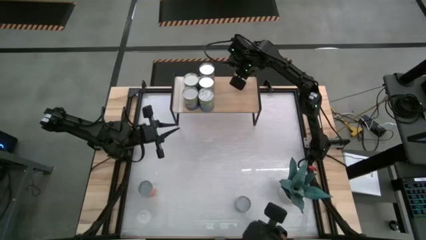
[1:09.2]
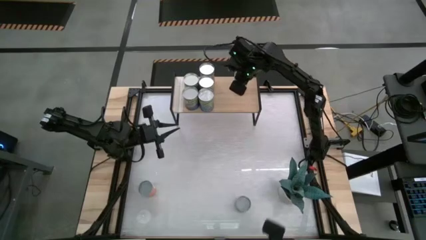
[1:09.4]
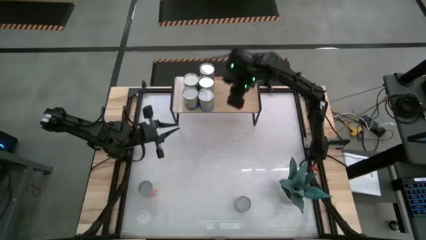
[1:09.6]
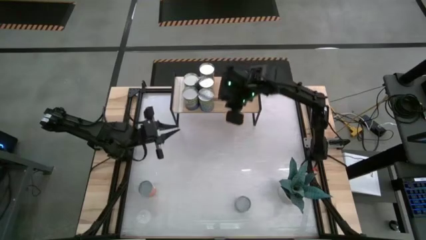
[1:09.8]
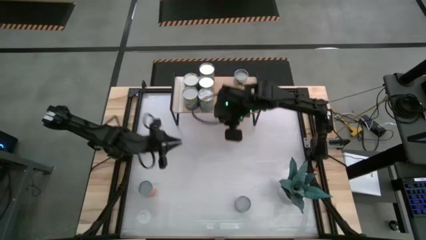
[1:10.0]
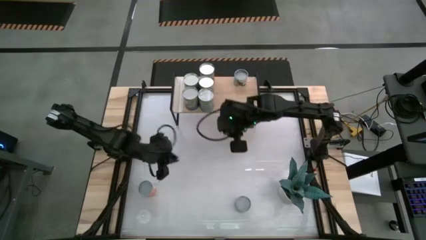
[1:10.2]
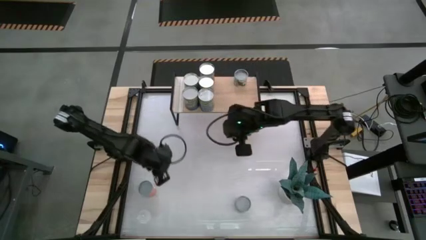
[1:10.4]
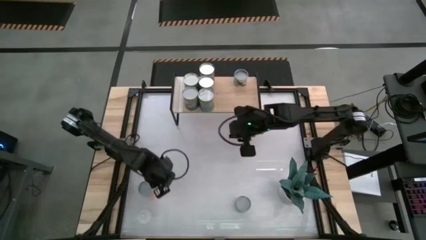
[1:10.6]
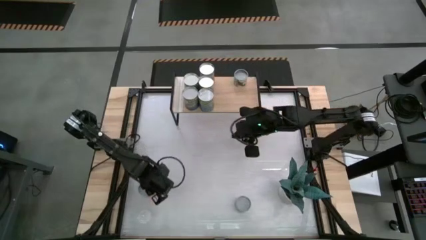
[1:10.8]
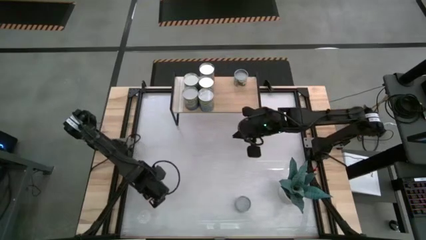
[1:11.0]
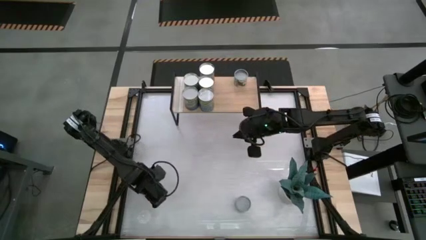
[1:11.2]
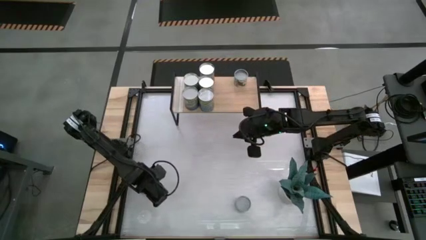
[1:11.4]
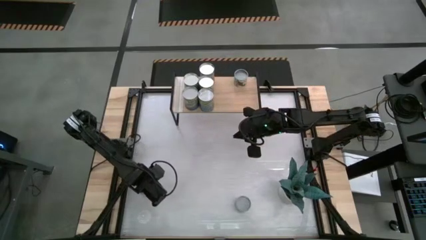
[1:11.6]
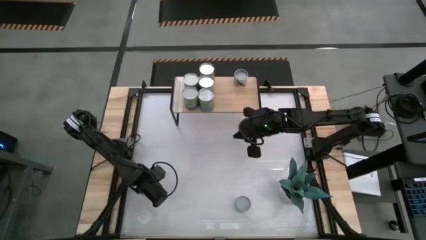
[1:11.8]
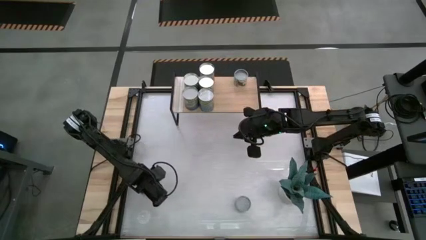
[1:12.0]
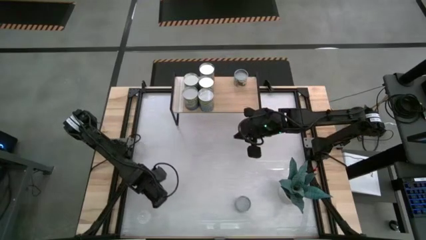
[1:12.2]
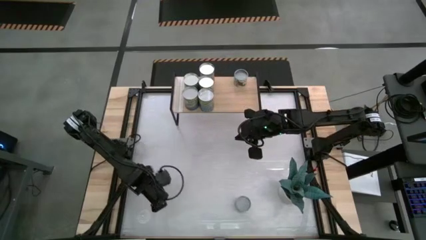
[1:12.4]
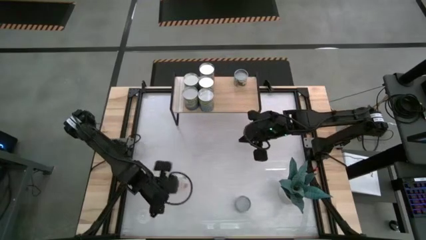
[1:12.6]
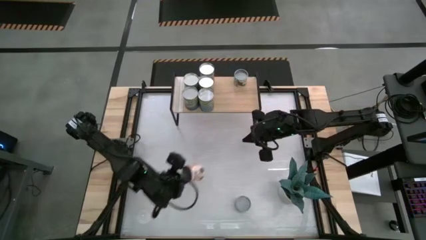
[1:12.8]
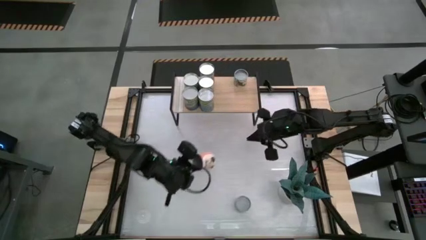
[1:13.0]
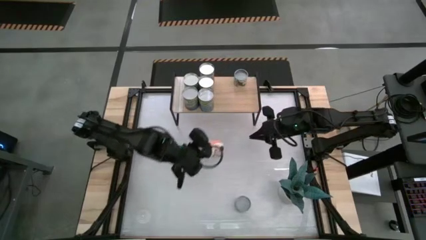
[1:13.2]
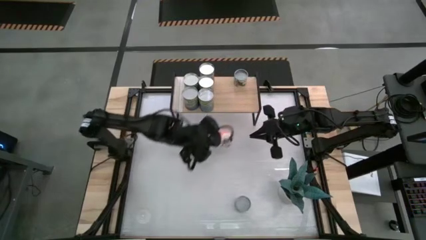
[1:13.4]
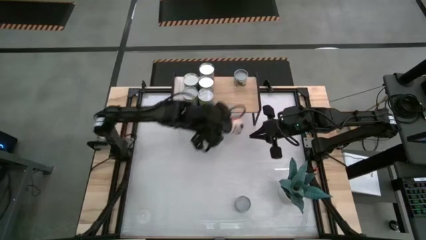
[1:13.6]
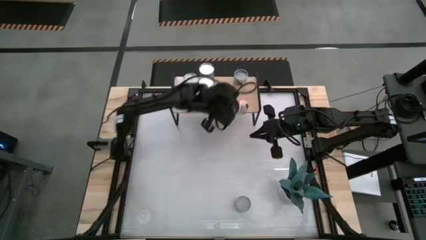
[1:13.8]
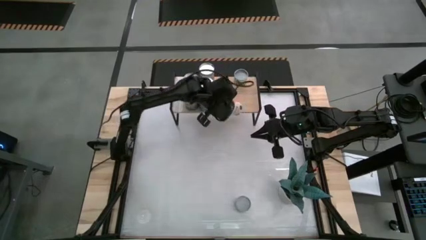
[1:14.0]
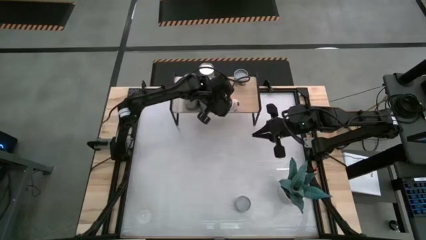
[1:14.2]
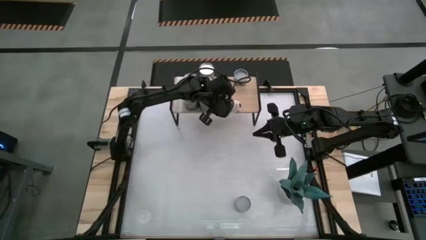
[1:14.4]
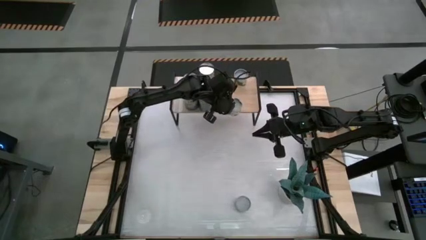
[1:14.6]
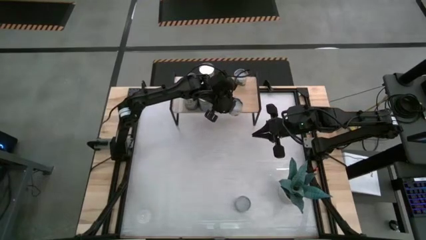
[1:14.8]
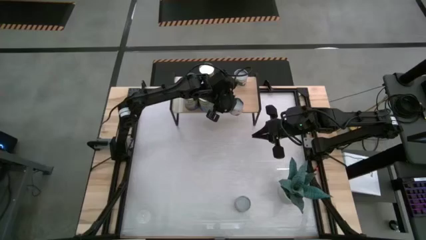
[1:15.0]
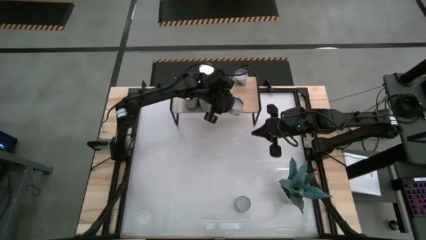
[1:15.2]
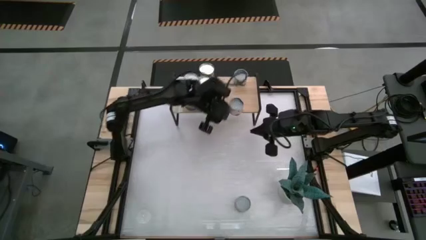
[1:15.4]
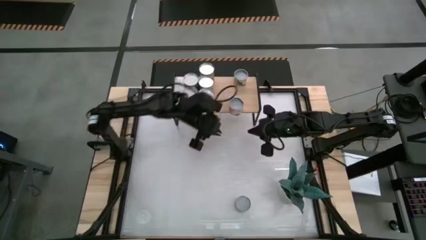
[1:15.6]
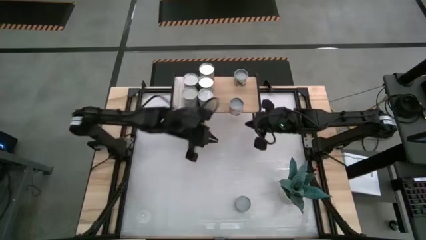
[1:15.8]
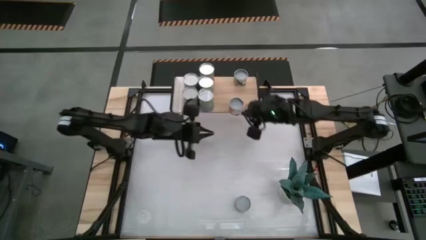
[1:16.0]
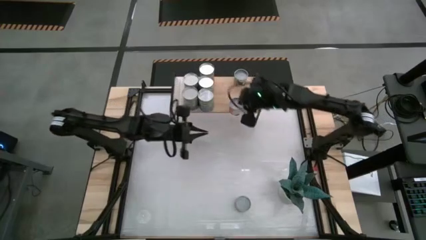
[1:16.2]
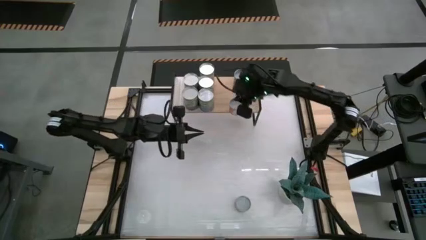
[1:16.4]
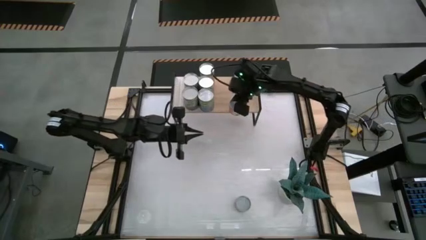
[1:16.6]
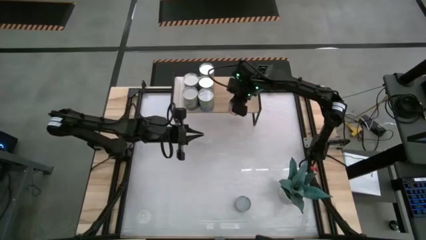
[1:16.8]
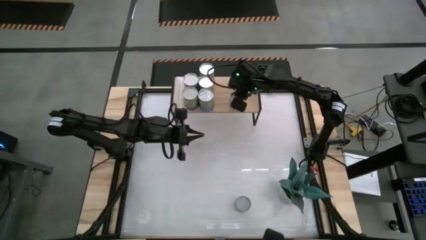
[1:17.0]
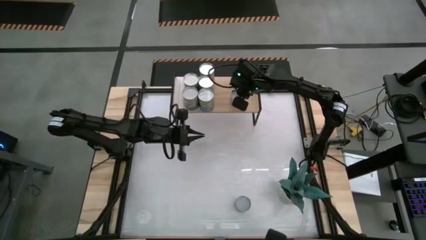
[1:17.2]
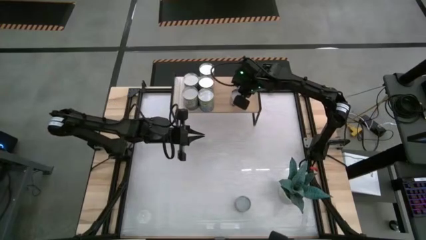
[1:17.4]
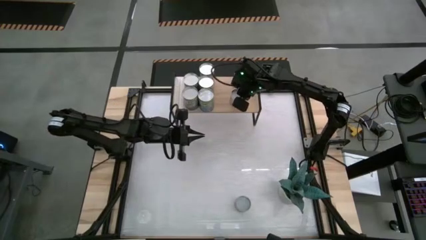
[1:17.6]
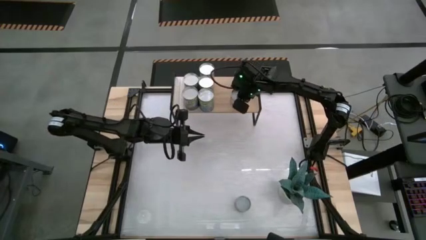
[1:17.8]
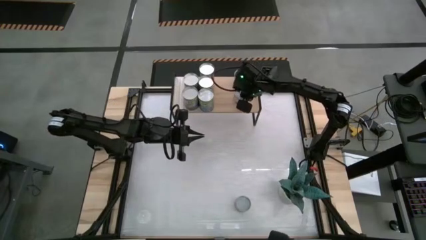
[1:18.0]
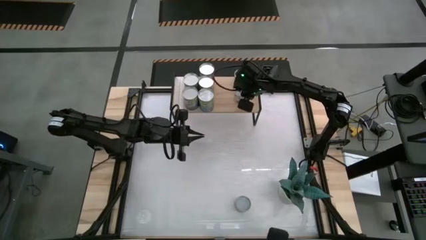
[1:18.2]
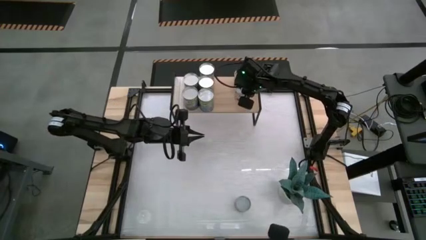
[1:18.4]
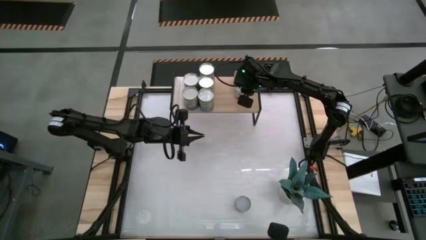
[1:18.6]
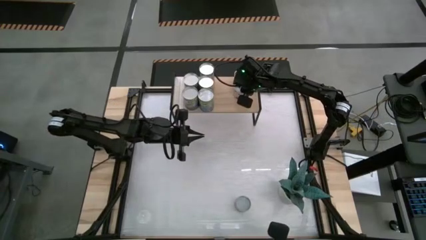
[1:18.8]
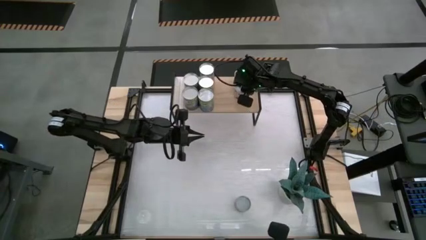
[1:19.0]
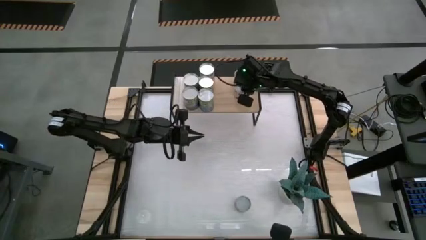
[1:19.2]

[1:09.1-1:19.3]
Task: Pick and place cans onto a shelf
Put the canned saucy meatballs on the shelf

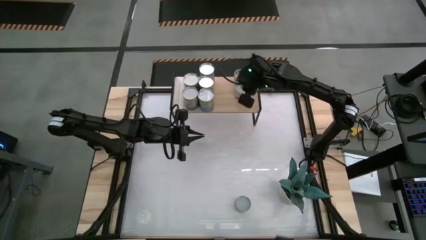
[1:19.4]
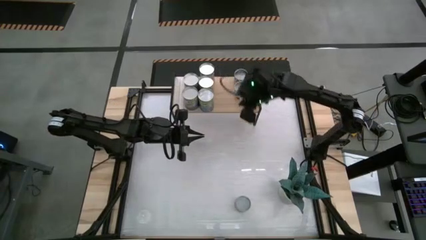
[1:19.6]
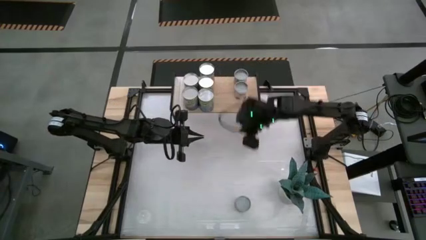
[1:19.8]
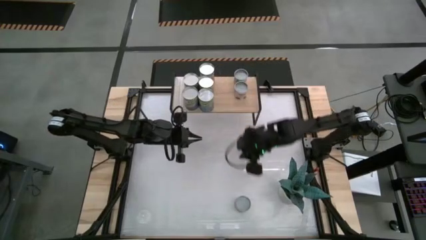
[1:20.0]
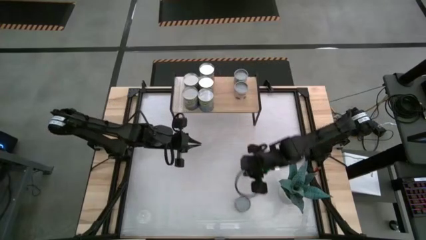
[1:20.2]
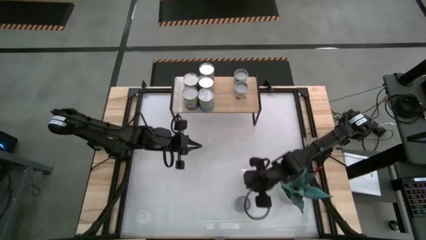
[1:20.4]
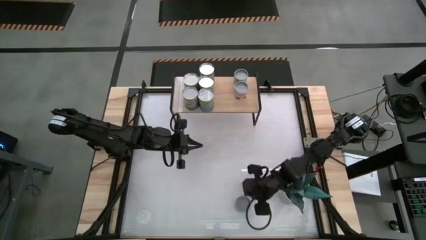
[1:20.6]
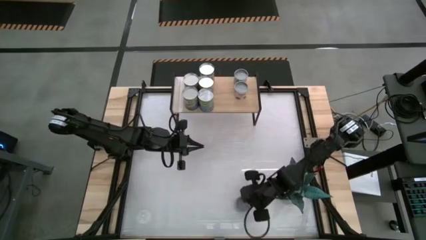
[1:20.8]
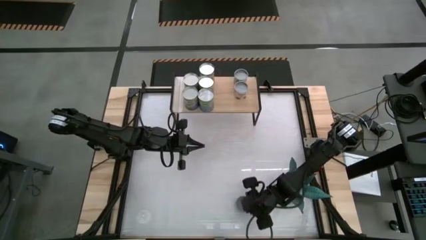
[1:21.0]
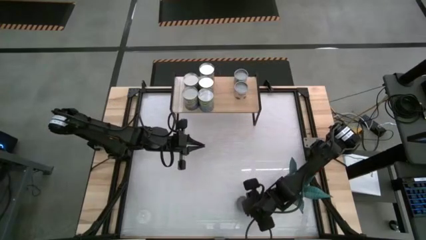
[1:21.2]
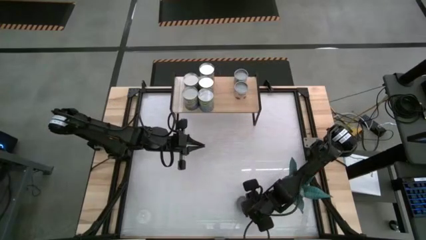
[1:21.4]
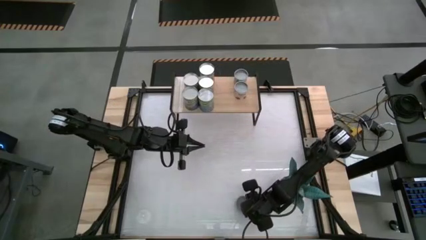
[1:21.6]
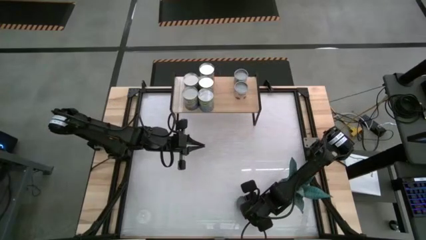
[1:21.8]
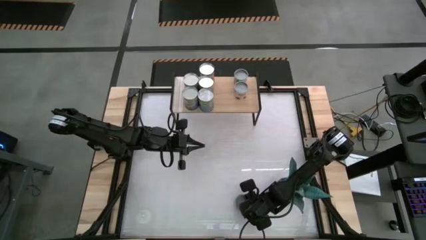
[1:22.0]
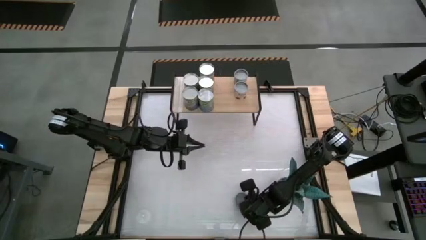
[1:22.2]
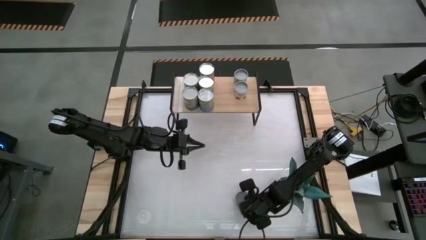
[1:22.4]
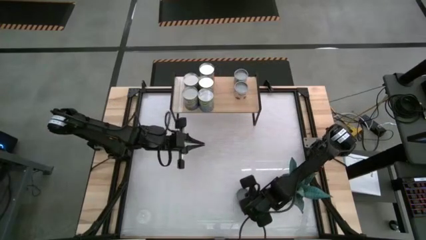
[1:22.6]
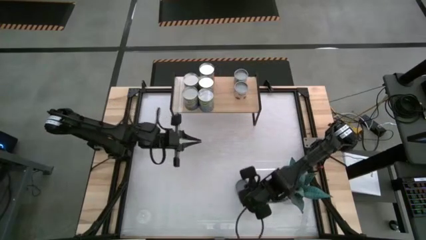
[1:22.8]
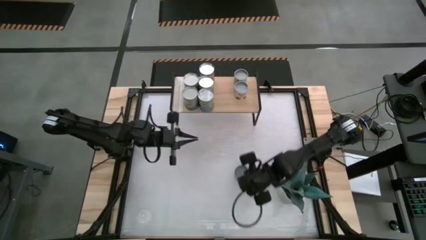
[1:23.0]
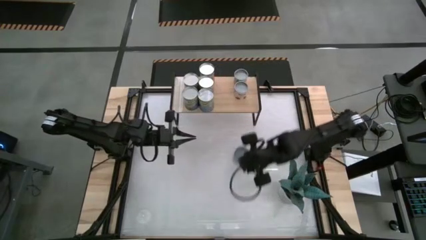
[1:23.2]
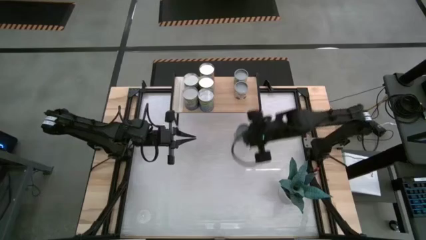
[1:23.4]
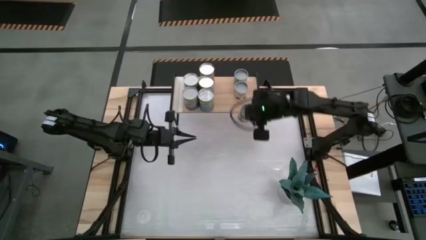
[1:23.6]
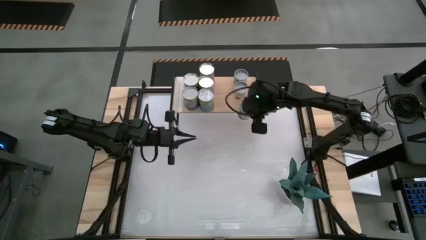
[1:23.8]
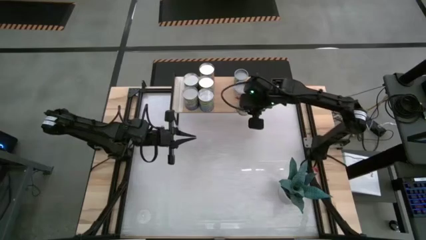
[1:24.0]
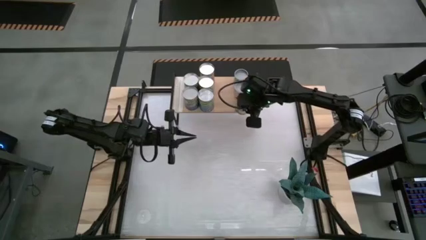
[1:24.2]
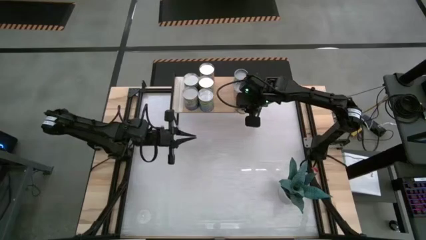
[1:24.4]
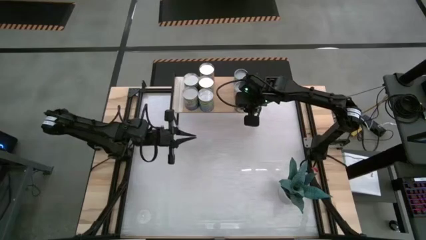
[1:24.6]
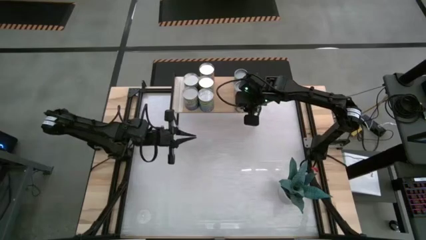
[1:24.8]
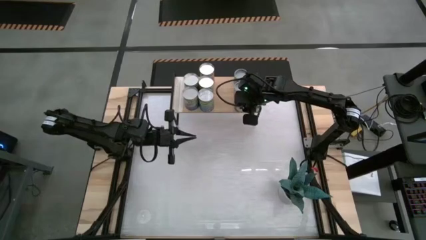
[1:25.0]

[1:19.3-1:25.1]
Put the canned peaches on the shelf
